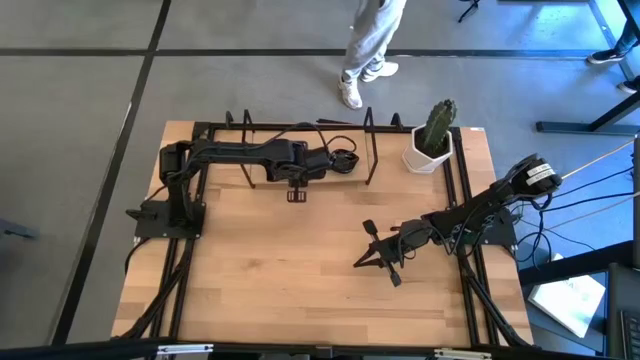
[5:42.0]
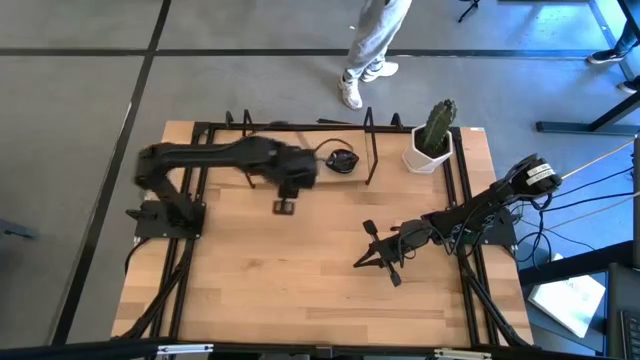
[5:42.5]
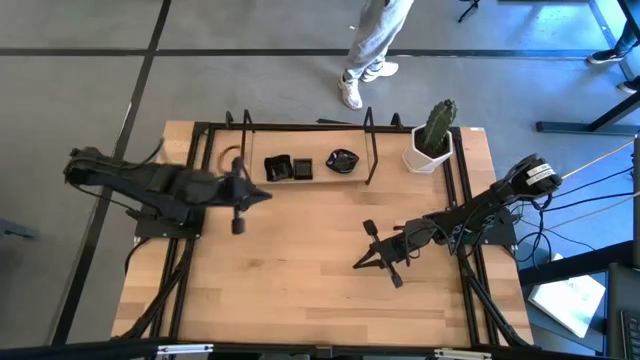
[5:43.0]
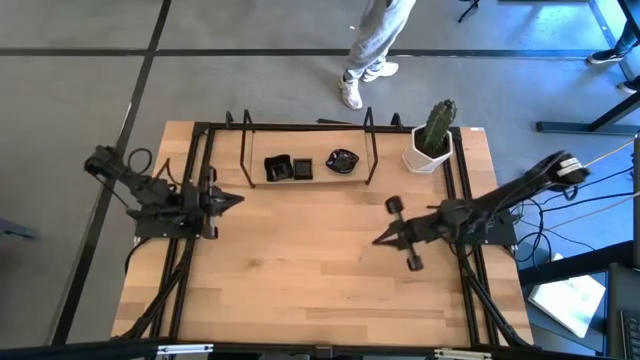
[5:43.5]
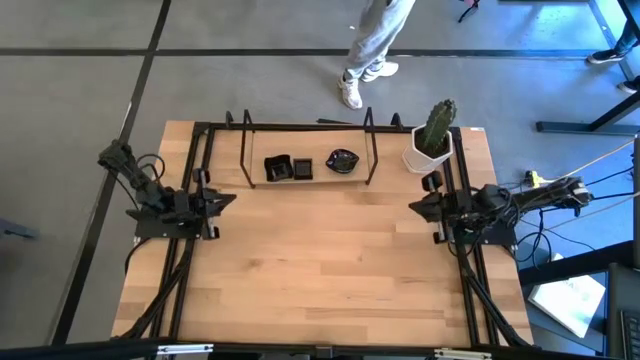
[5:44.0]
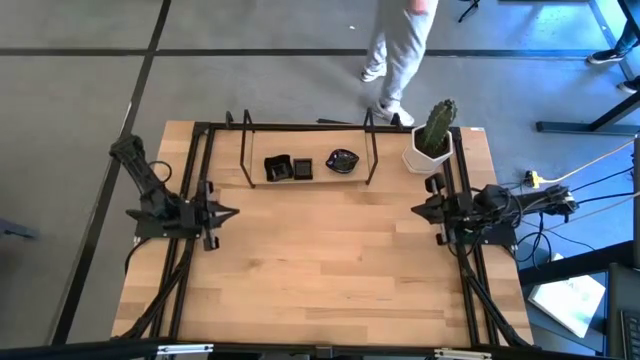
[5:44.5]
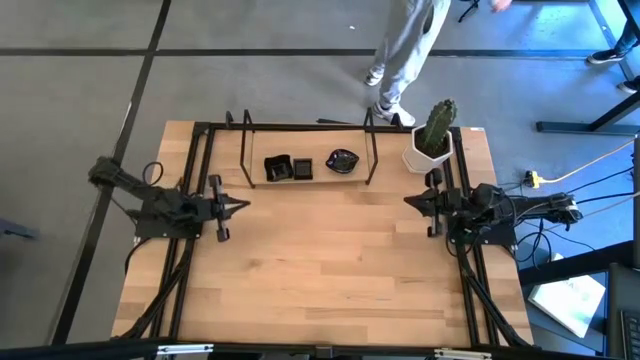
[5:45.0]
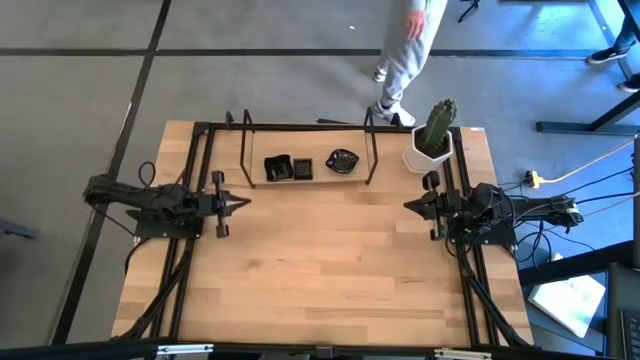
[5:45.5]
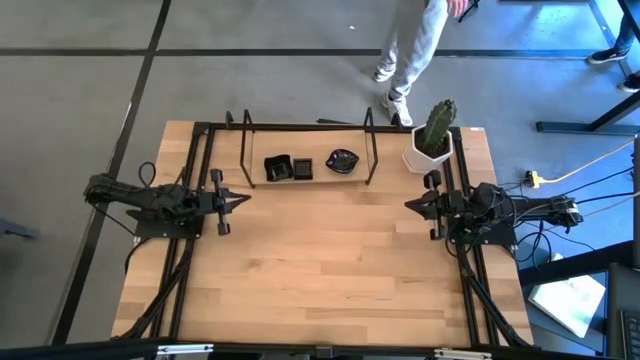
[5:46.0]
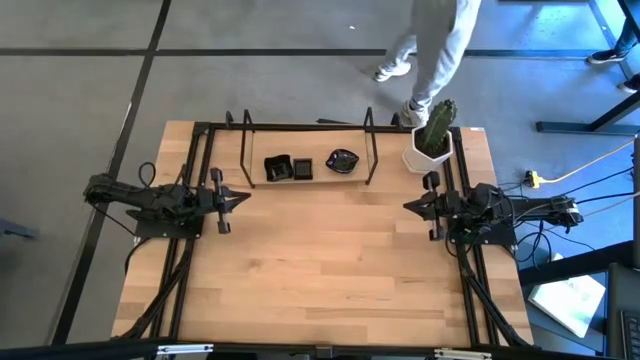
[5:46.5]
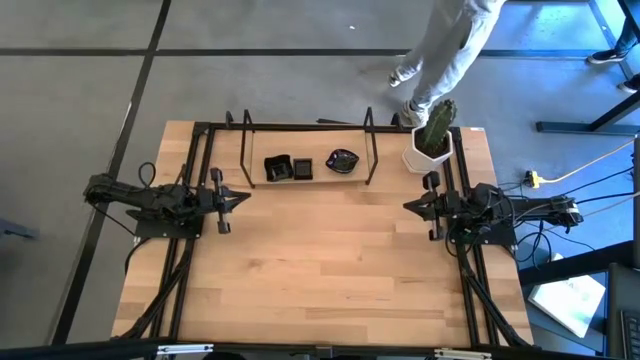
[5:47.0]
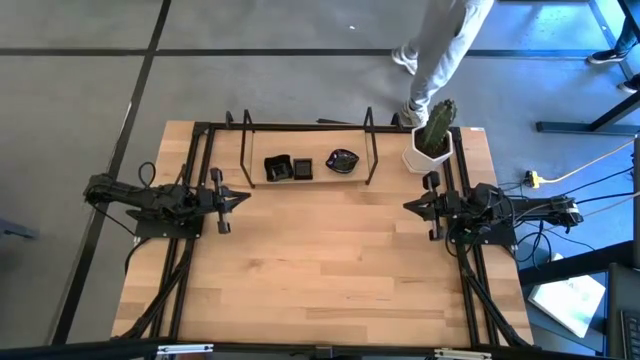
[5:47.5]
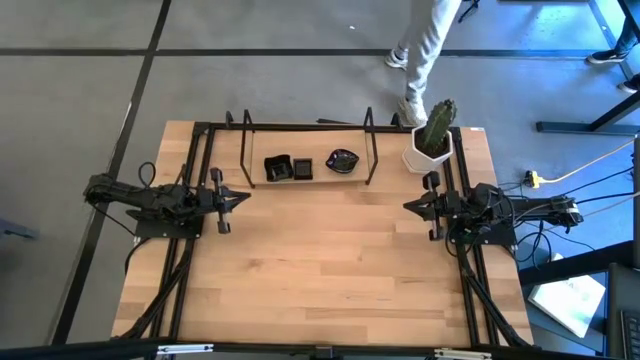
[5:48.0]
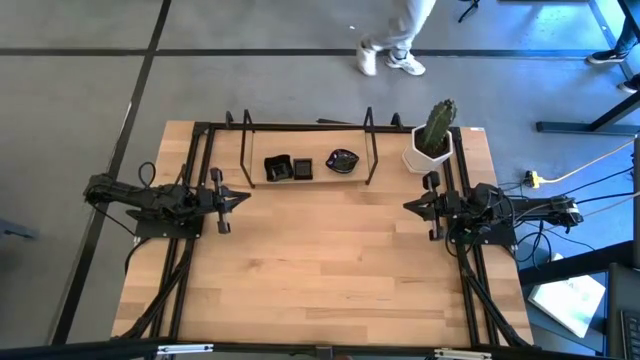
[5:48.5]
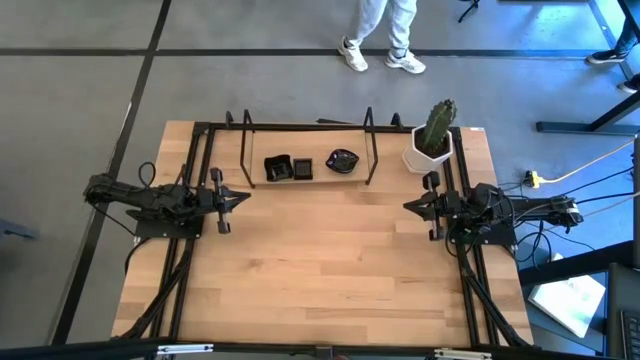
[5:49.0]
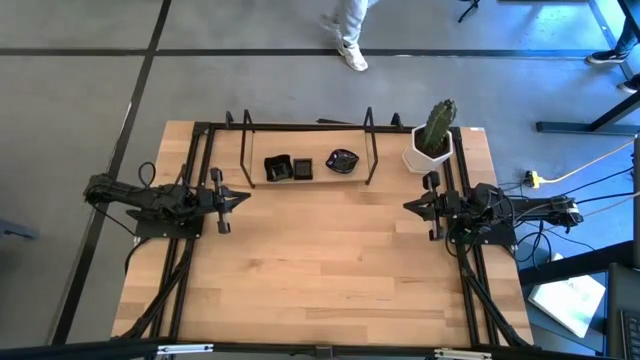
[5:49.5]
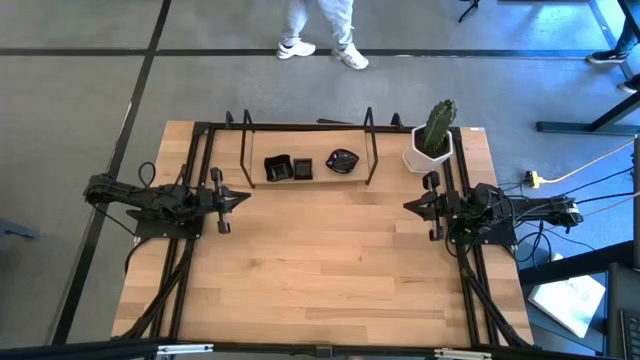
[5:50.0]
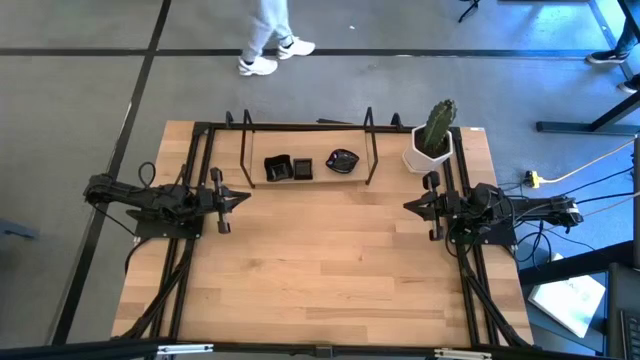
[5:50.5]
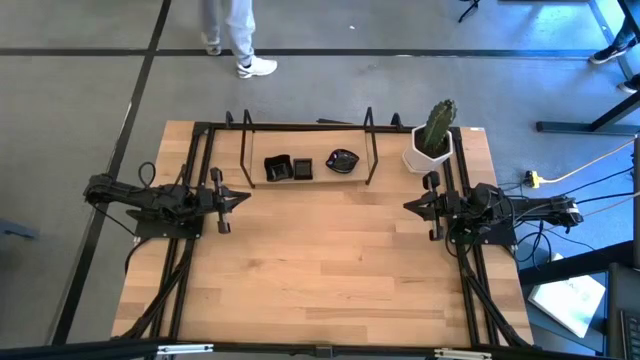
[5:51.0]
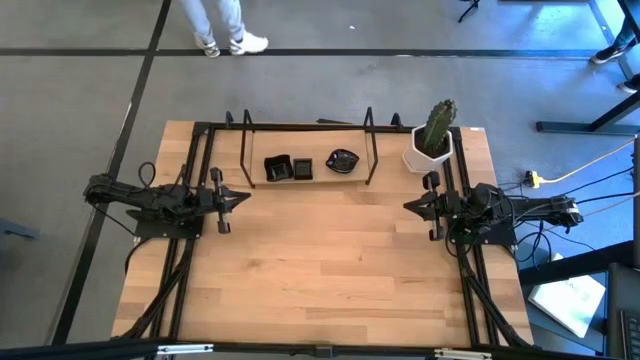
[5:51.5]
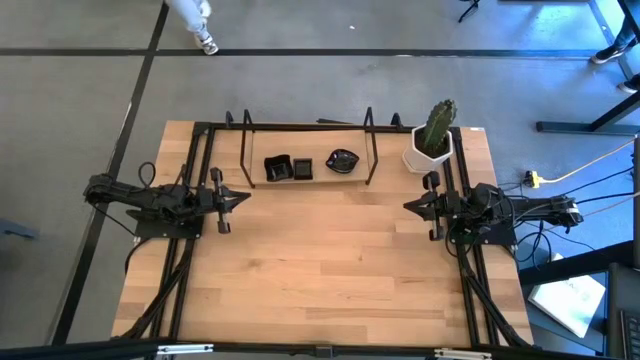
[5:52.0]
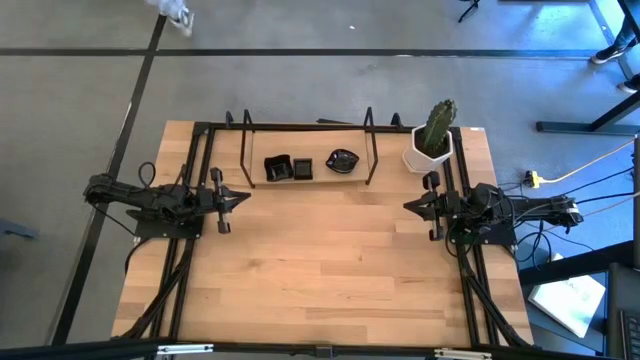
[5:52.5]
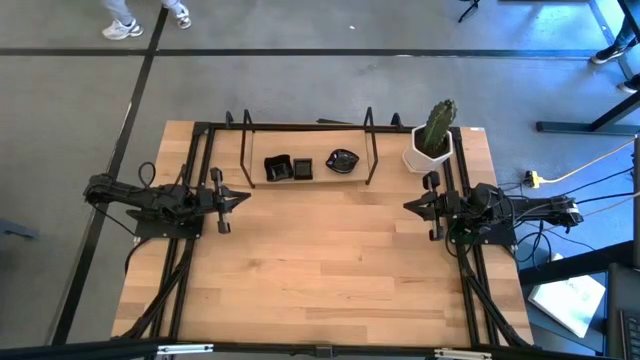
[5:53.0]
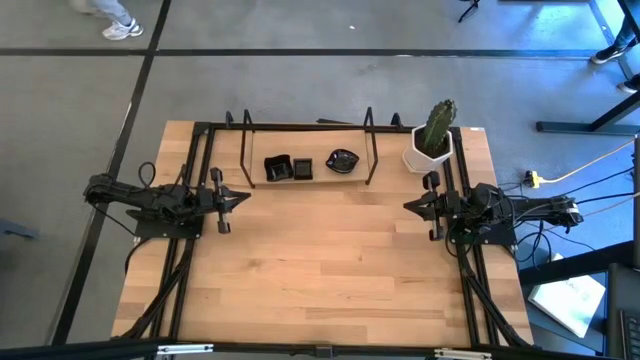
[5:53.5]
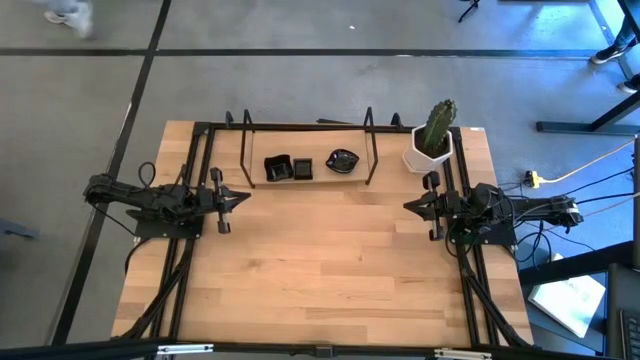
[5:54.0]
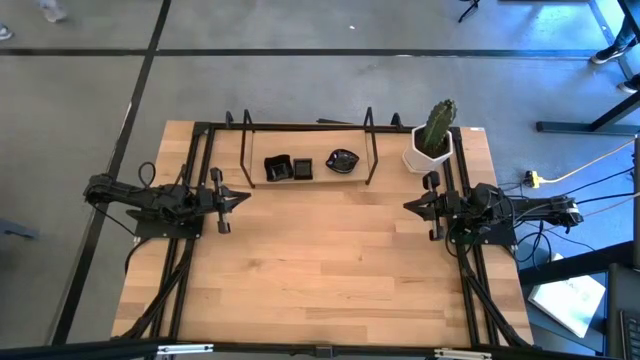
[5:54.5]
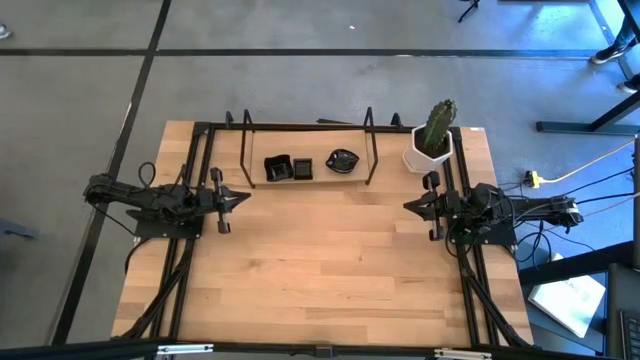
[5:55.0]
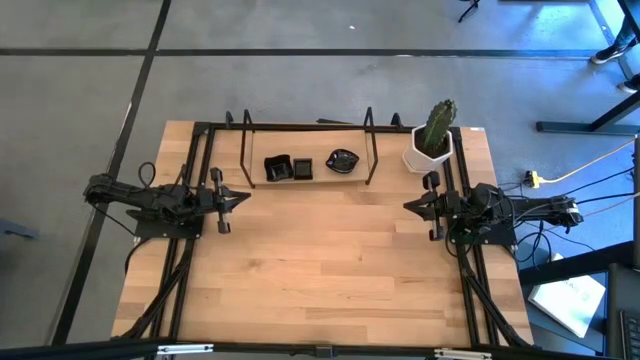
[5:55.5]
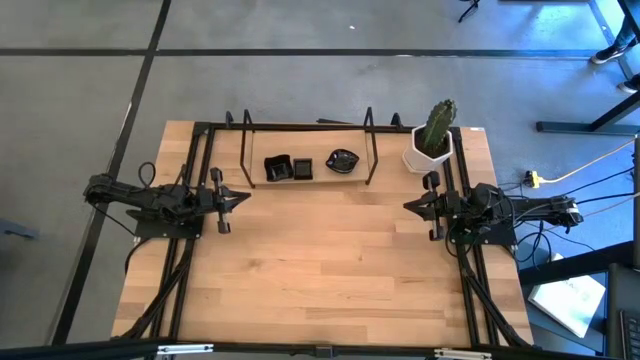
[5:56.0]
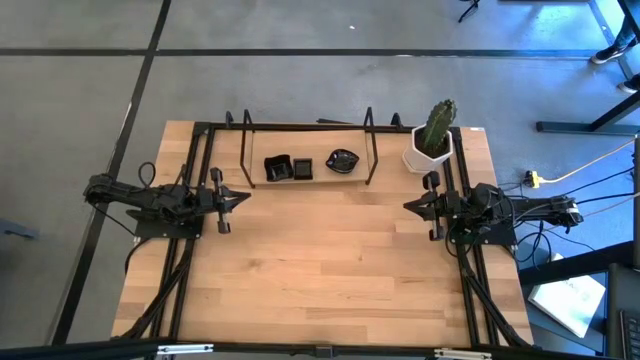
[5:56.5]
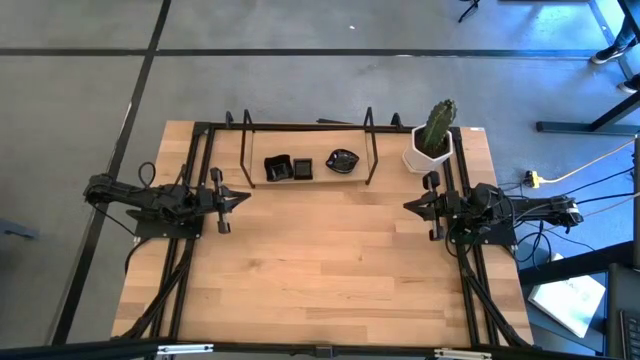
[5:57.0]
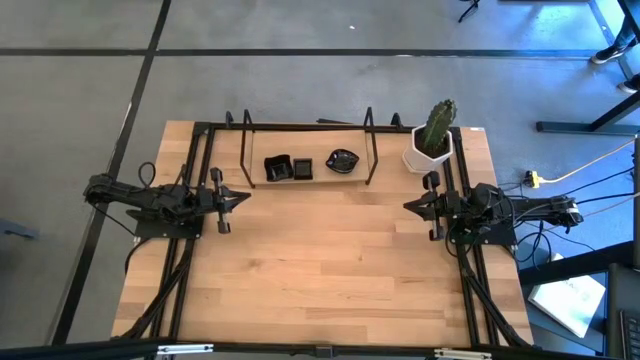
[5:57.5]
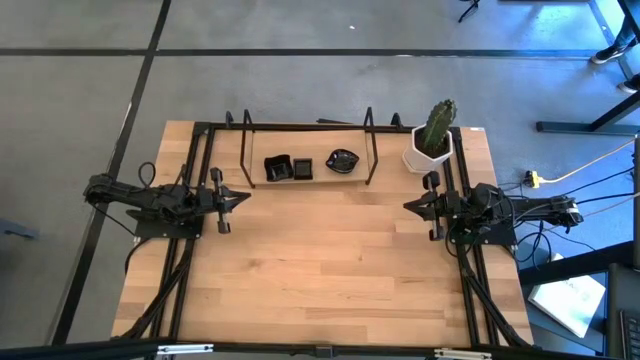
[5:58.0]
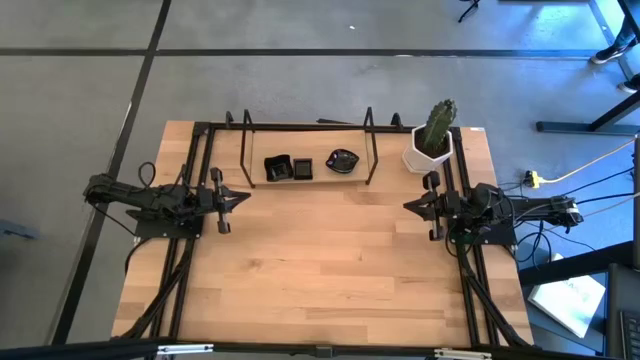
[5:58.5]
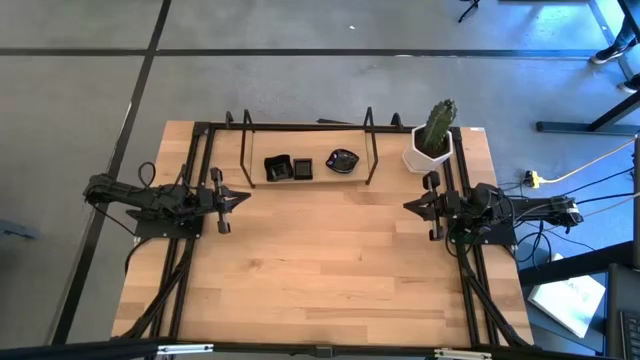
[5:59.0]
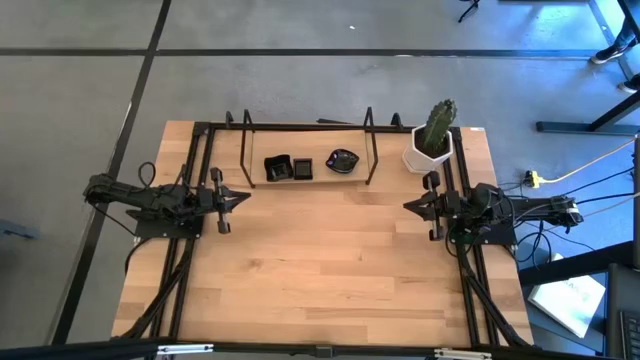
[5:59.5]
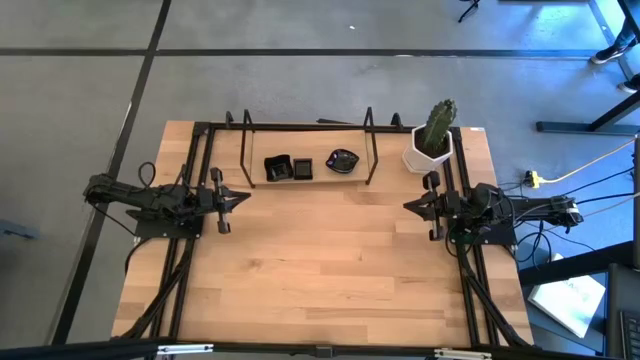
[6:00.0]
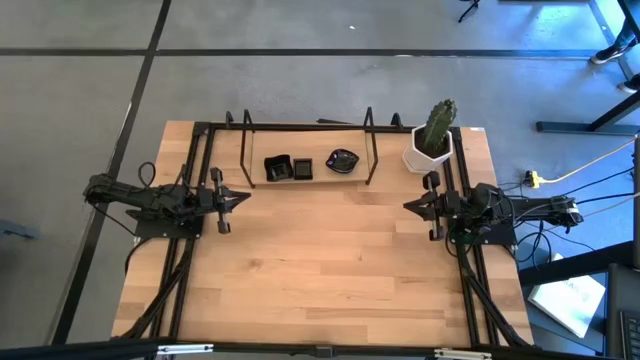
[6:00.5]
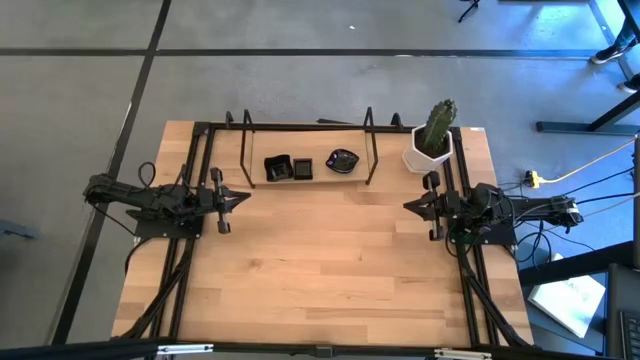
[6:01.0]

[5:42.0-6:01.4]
Task: Pick & Place Mini shaped plates
Return to Home Position

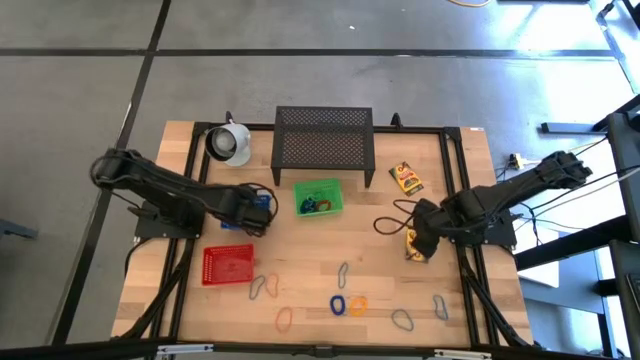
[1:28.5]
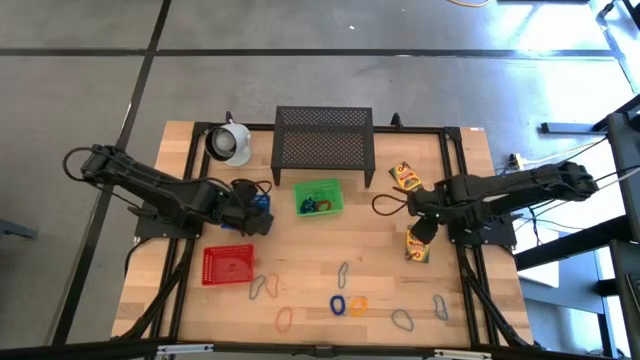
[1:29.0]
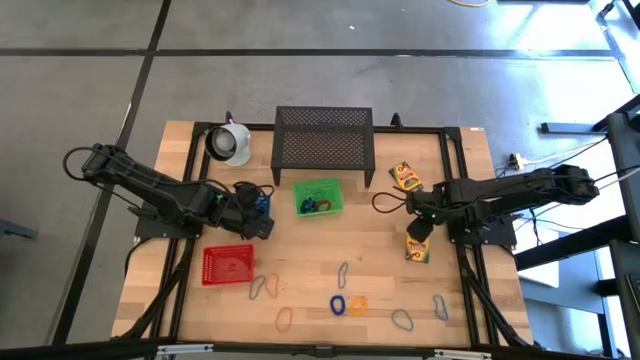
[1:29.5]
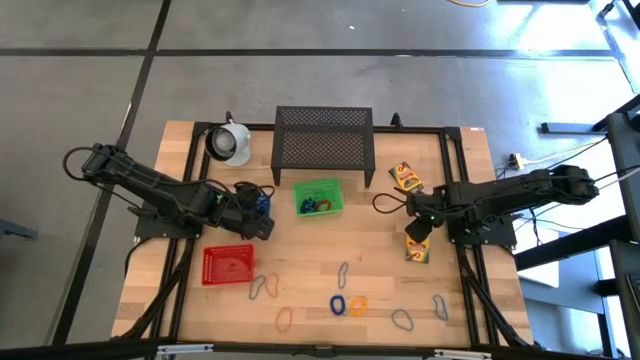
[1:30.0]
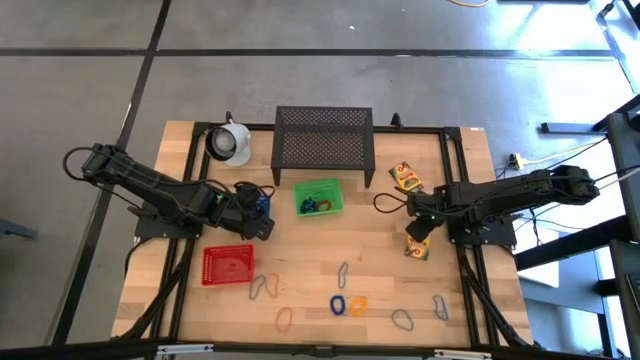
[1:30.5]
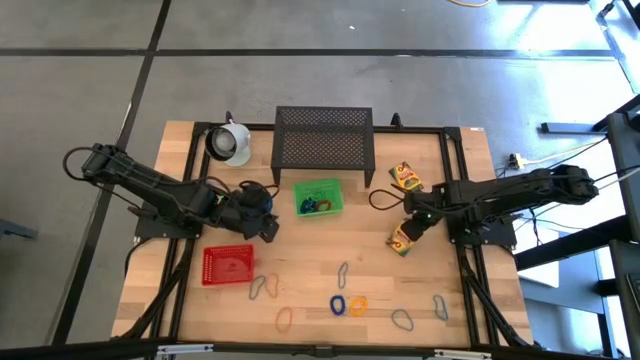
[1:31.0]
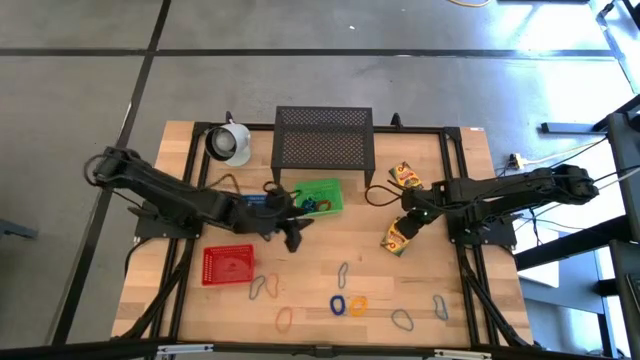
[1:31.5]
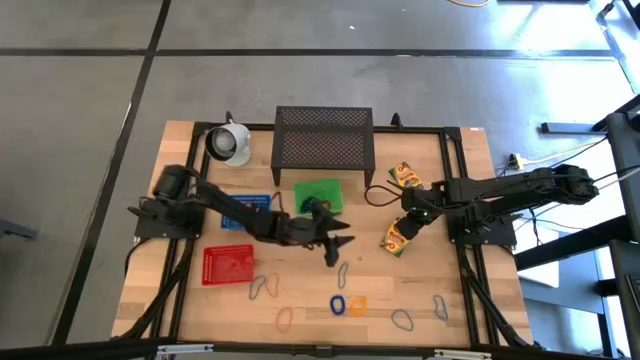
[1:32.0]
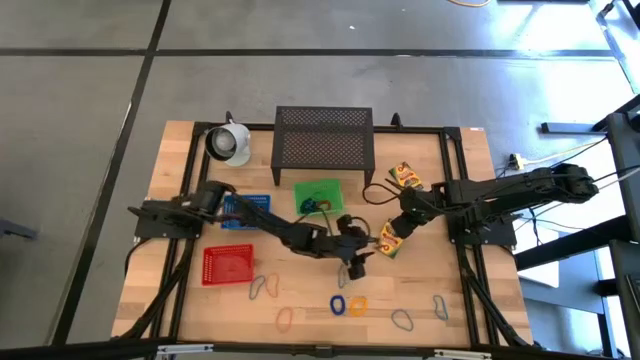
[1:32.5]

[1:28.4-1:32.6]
Task: Pick & Place Office Desk Supplies
Put the bottom yellow box of crayon into the red bin
